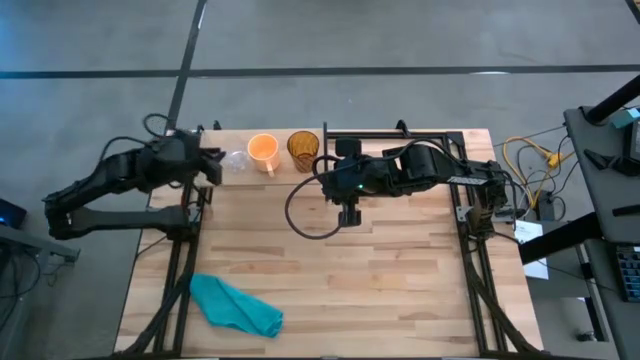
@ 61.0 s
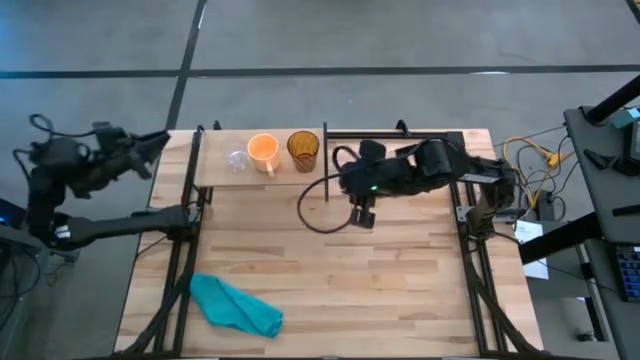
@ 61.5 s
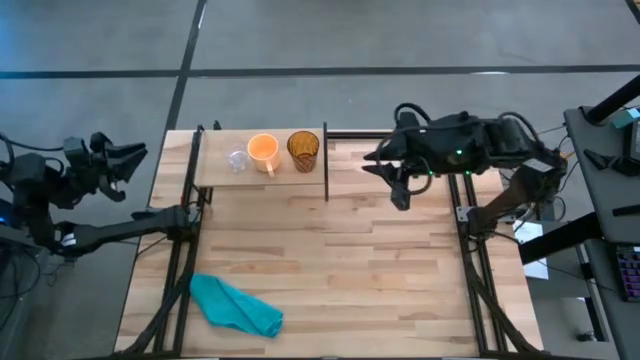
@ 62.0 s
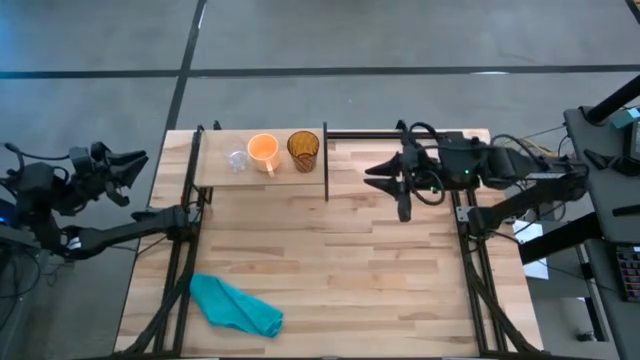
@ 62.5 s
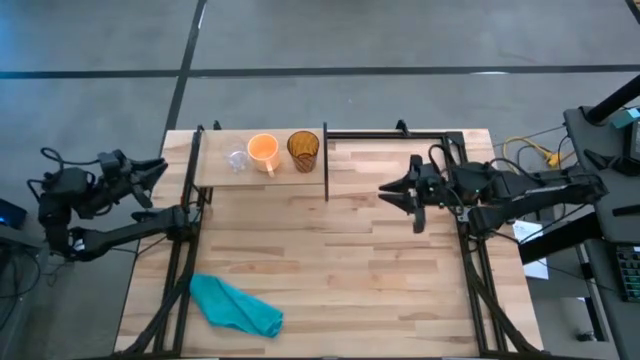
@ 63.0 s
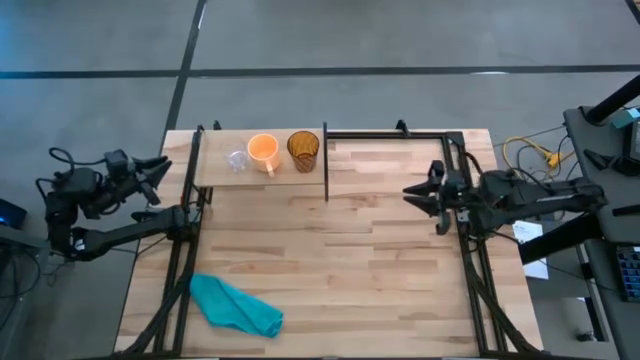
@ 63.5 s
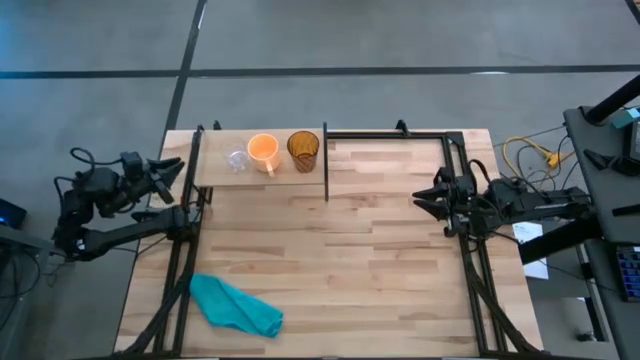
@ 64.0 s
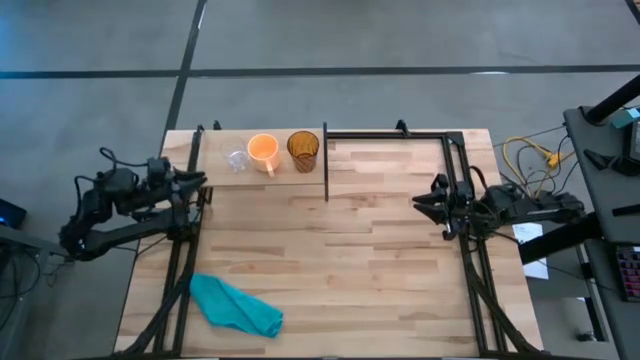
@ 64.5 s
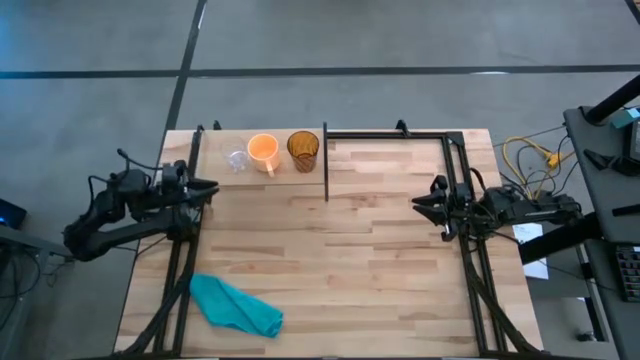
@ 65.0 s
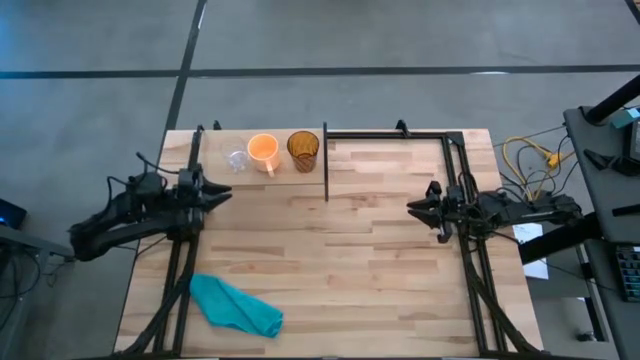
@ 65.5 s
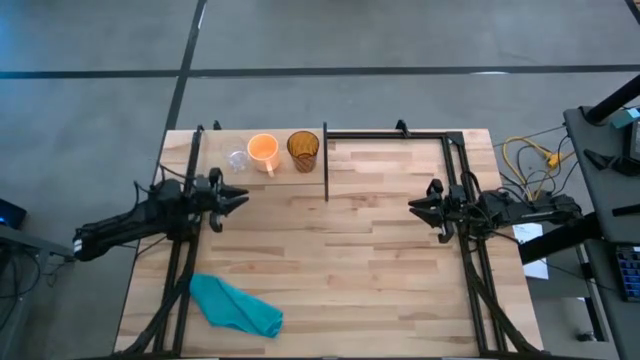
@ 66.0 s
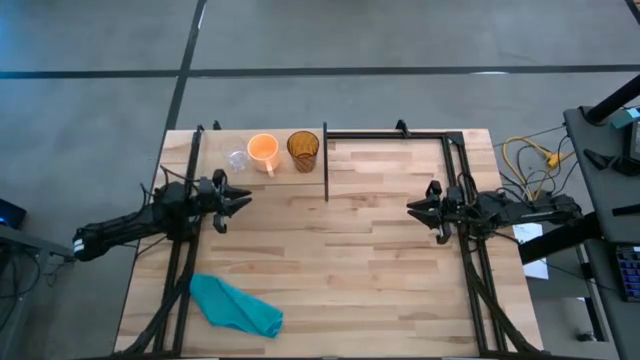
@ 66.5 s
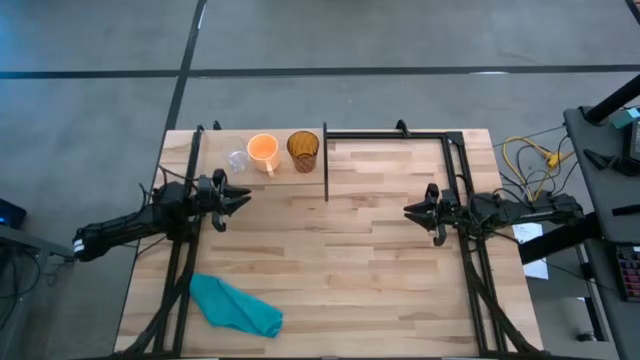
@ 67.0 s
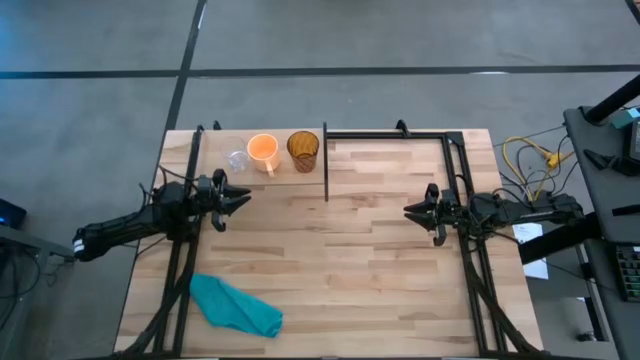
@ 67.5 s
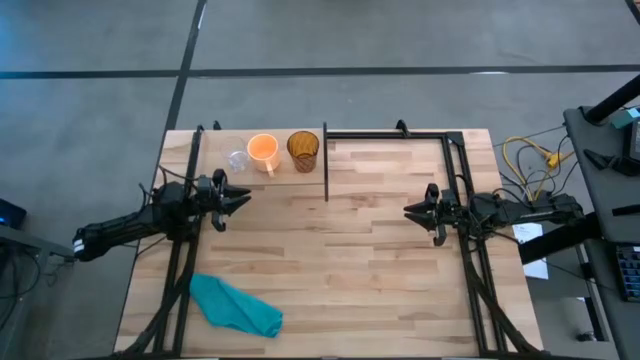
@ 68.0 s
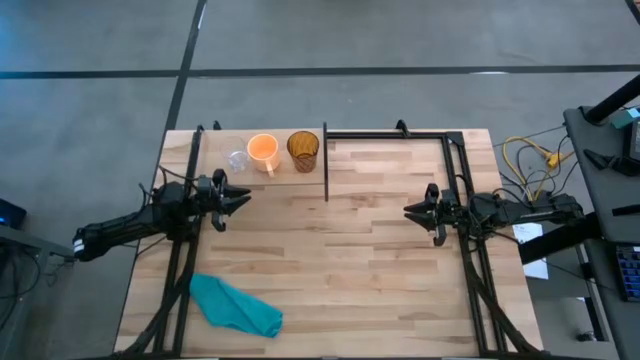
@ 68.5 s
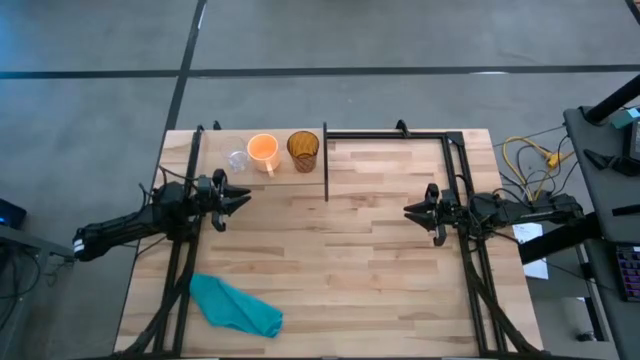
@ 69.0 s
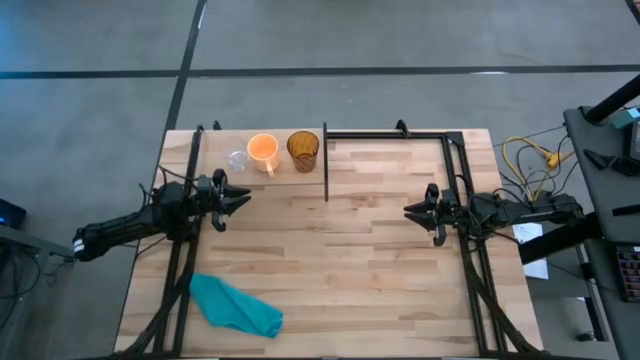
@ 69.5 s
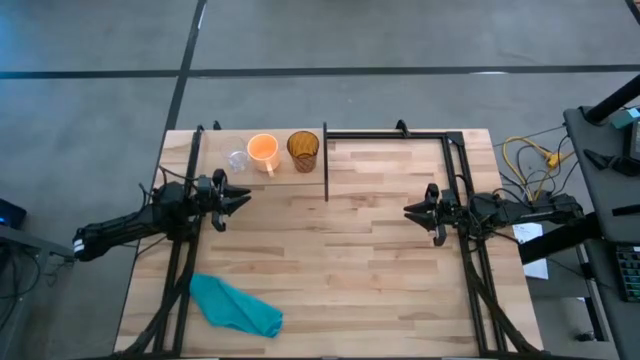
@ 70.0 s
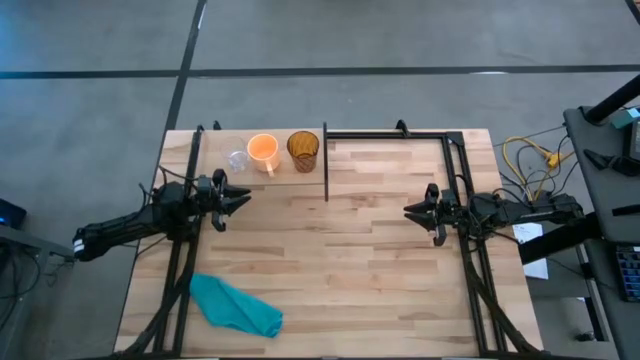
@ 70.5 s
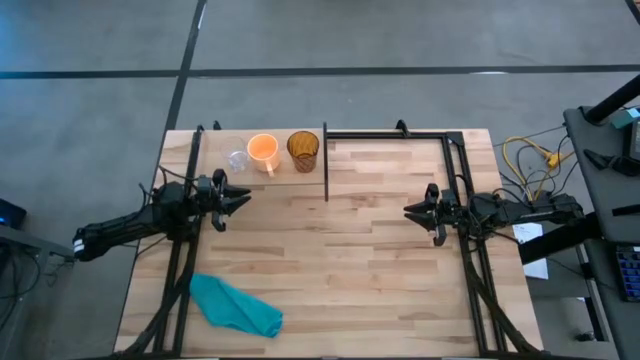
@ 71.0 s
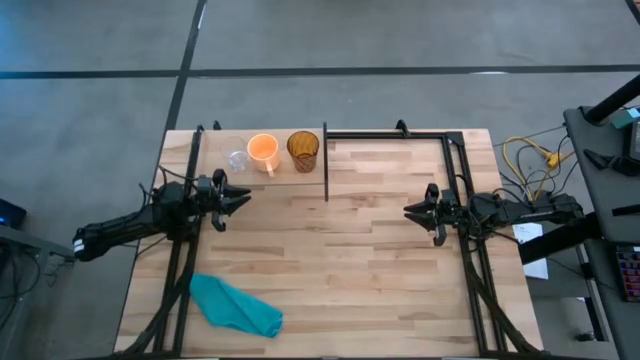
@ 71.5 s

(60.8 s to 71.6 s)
Task: Stack small to large cups/mugs on shelf
Return to Home Position

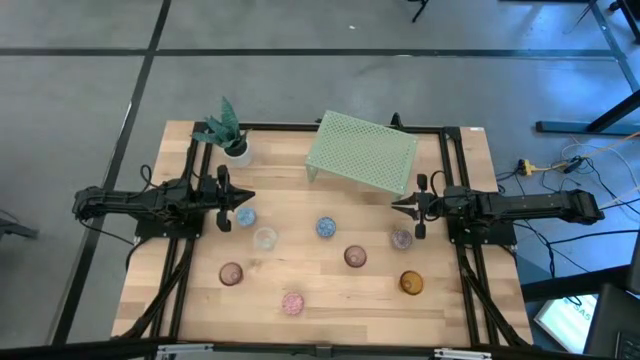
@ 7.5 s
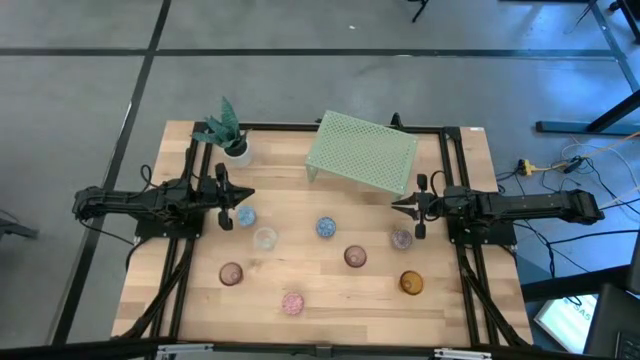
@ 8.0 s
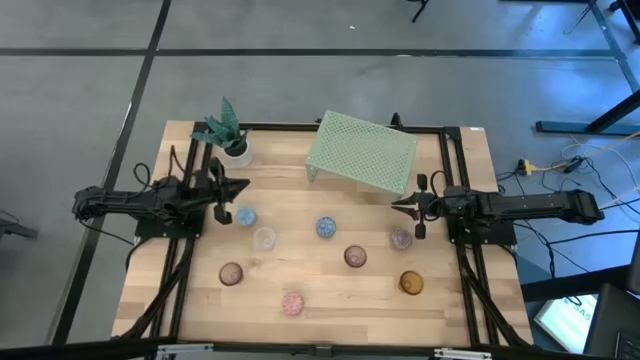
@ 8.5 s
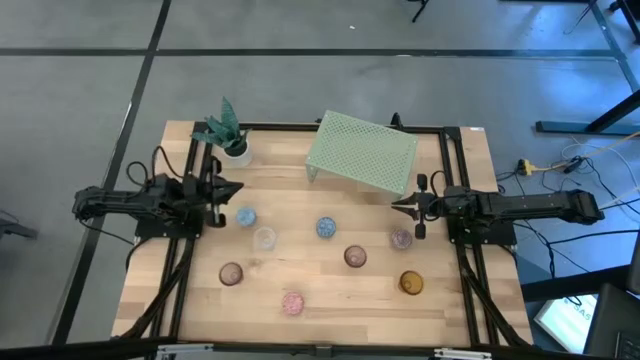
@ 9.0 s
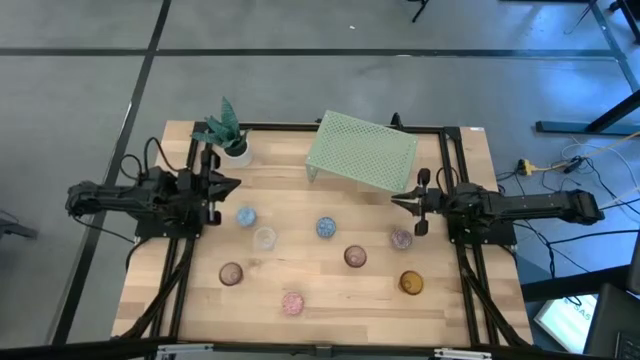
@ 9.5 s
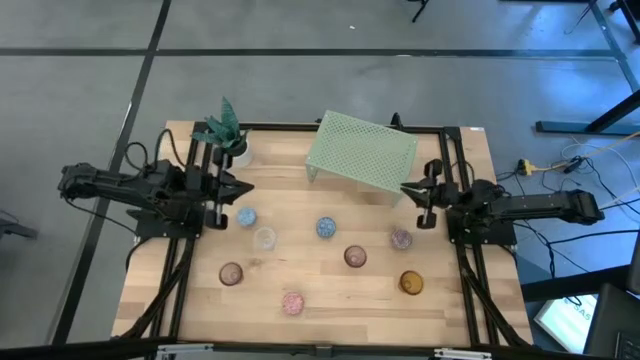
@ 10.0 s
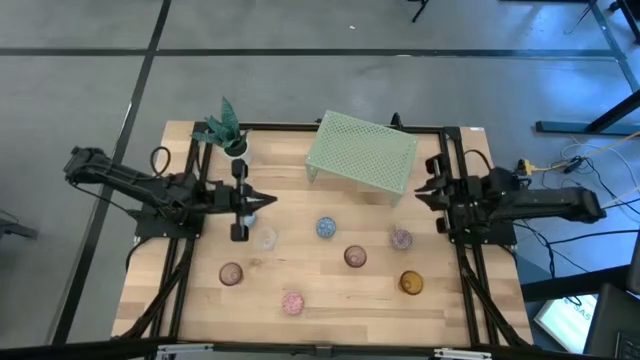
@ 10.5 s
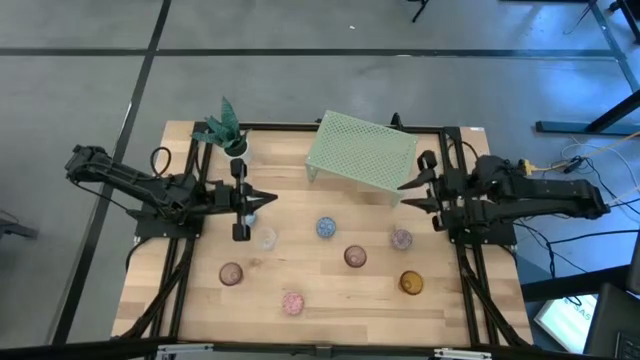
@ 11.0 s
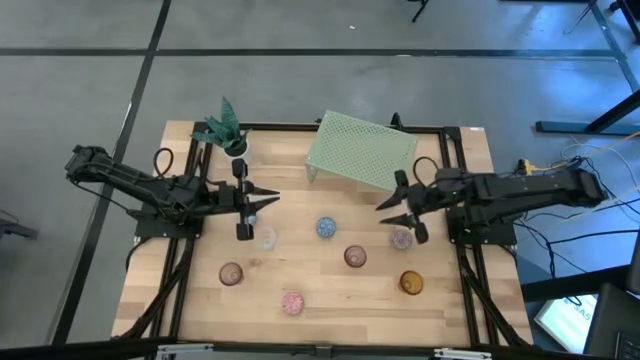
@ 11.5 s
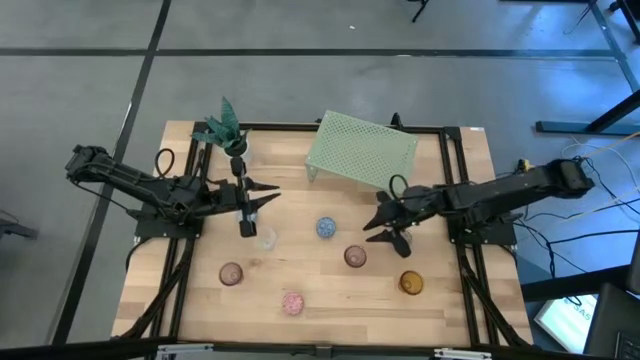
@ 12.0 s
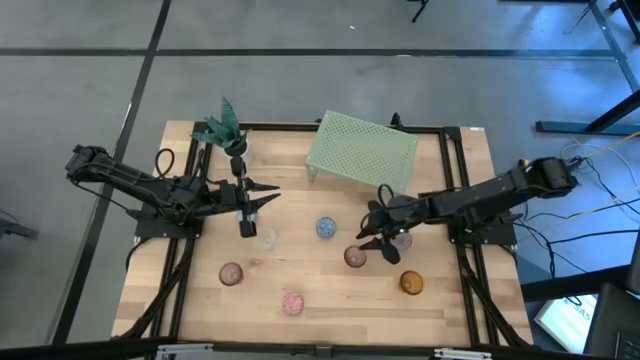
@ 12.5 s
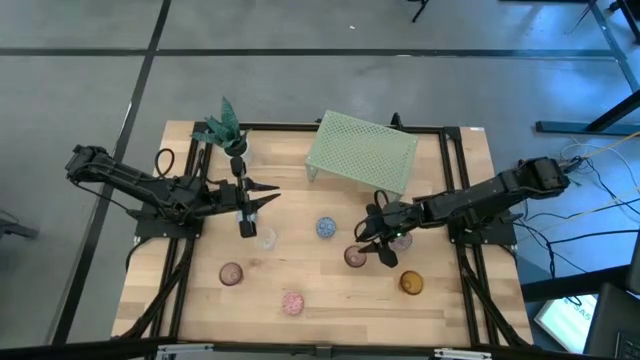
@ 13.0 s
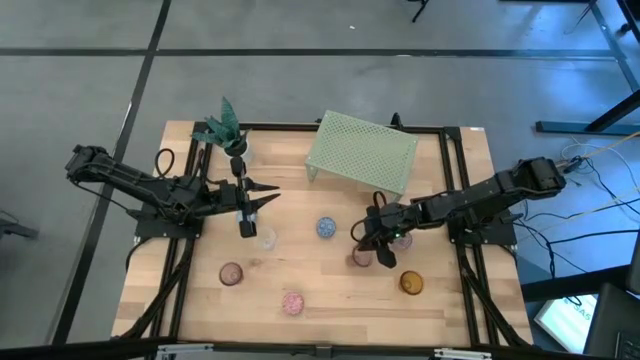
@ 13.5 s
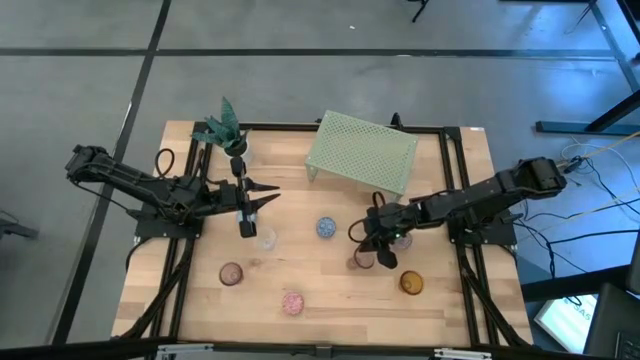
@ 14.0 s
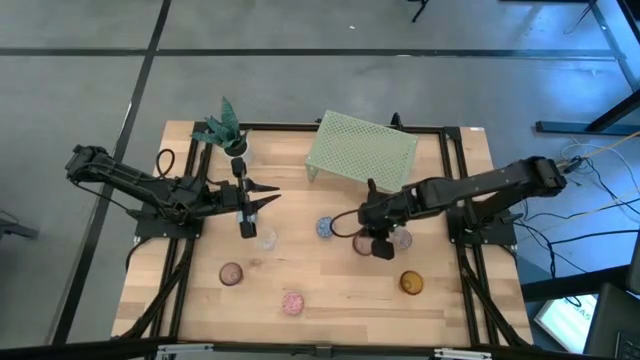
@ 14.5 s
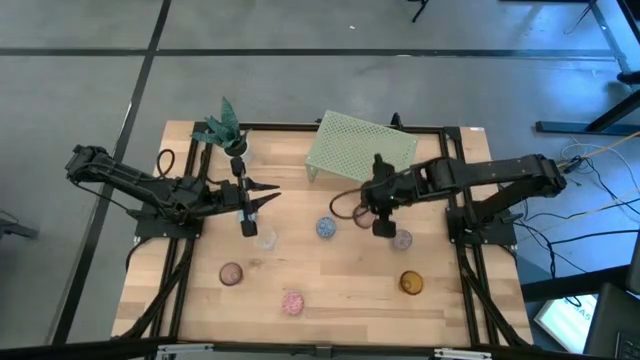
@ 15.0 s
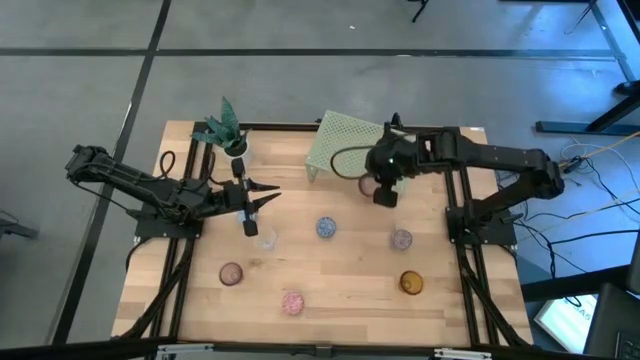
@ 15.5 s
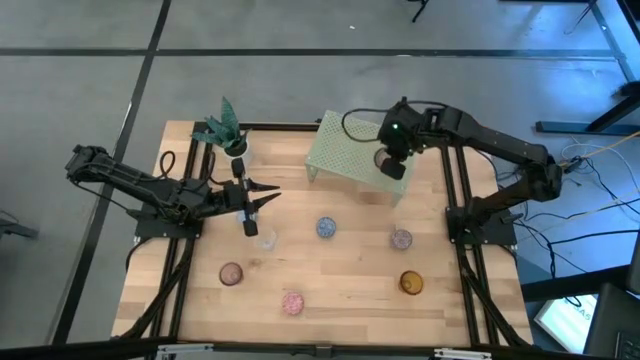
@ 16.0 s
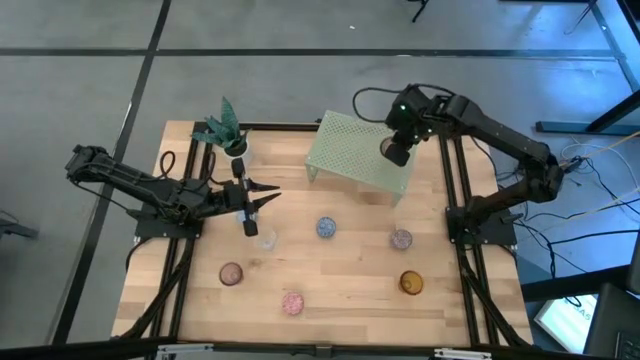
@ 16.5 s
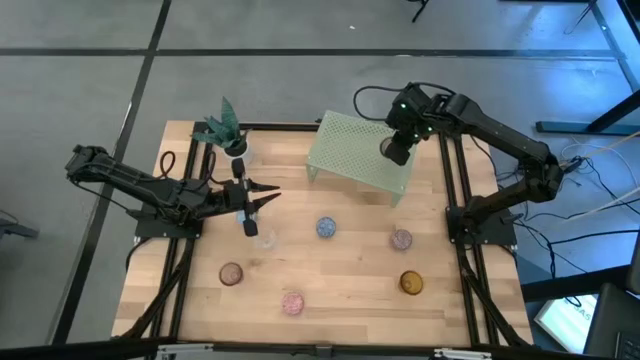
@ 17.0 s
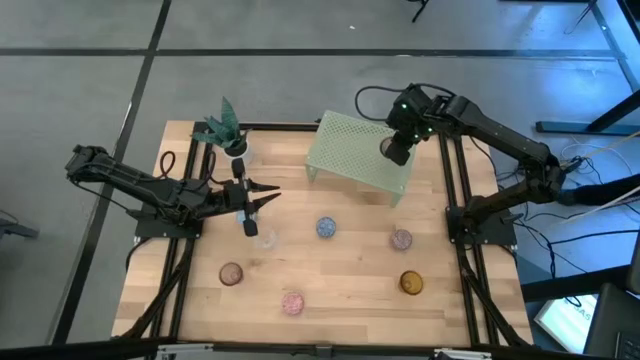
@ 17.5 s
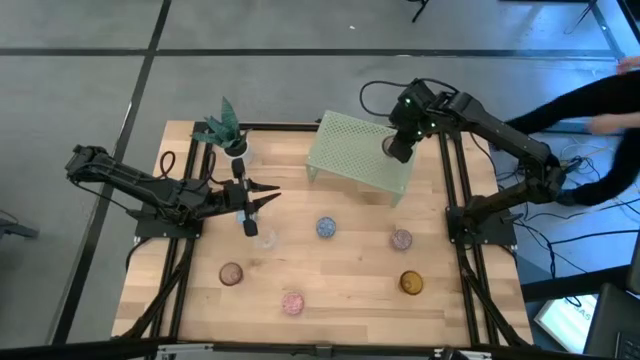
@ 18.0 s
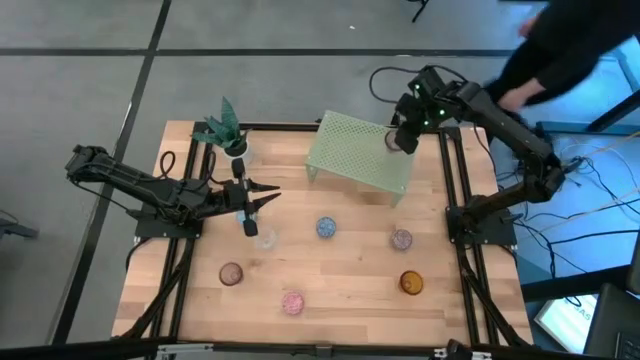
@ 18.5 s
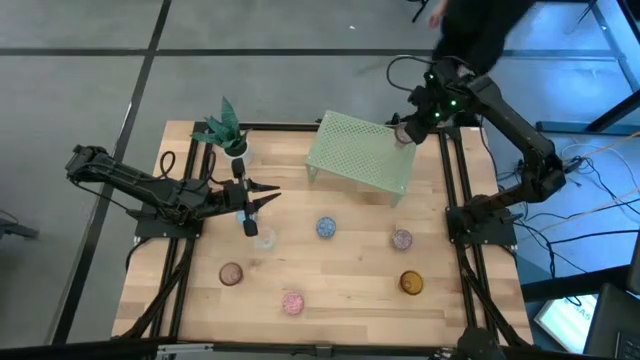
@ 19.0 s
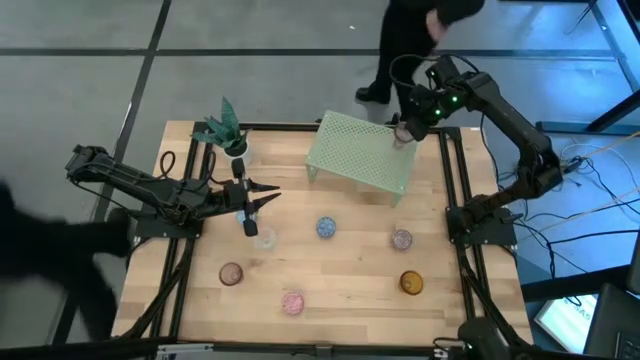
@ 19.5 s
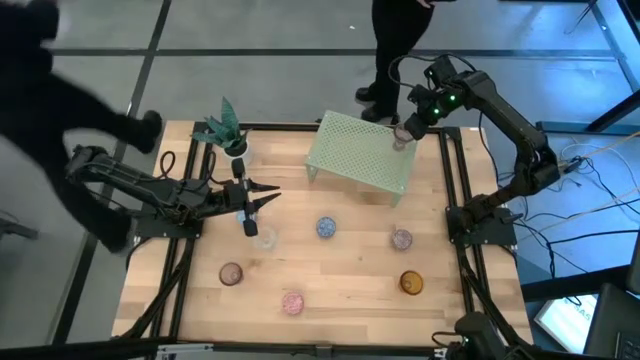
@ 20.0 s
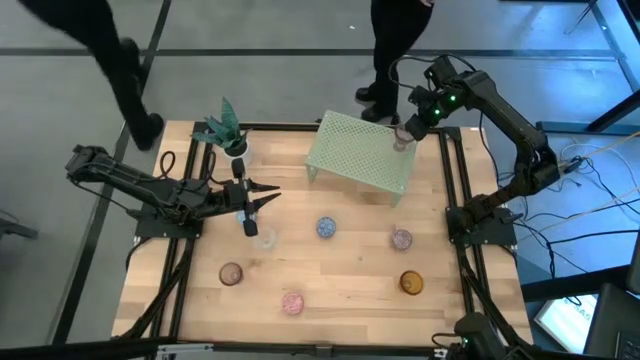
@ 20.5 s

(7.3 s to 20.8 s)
Task: Pick & Place candle stick holders
Put the top pink candle holder on the shelf
